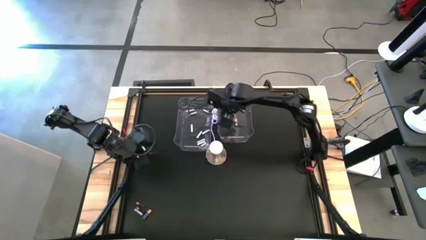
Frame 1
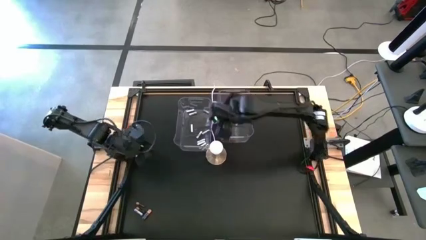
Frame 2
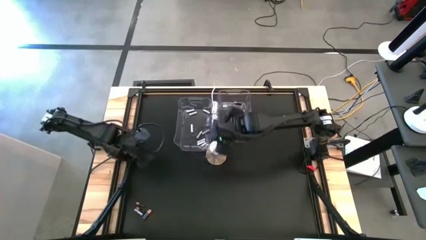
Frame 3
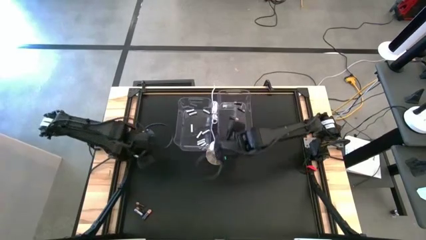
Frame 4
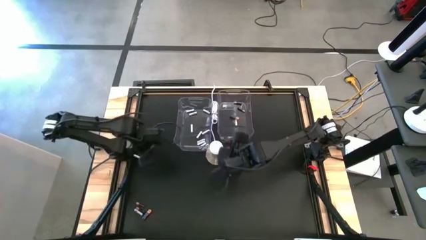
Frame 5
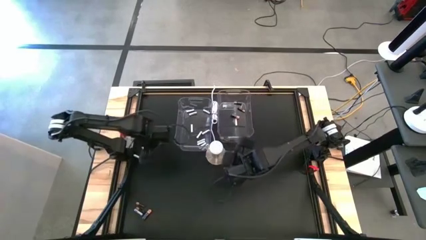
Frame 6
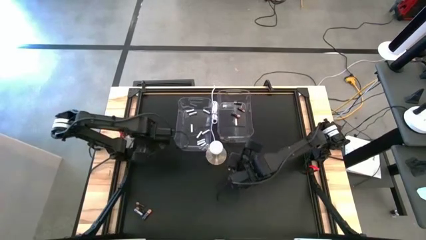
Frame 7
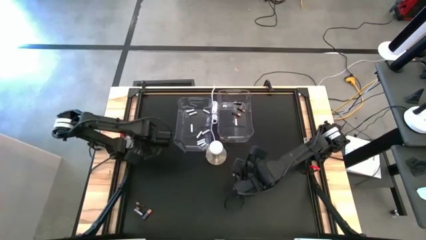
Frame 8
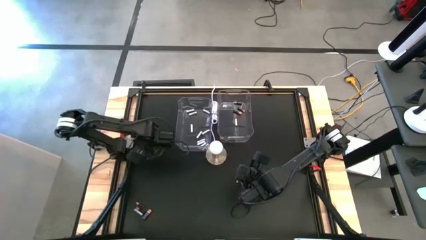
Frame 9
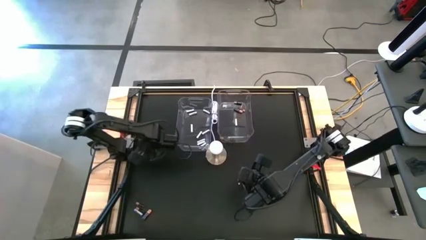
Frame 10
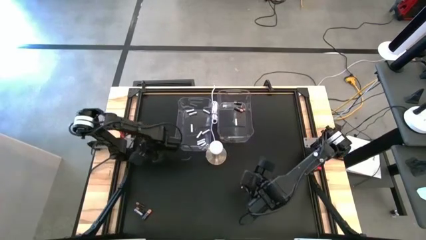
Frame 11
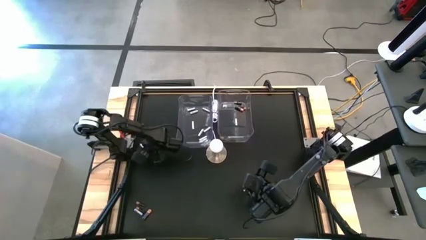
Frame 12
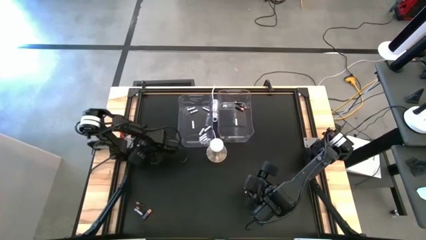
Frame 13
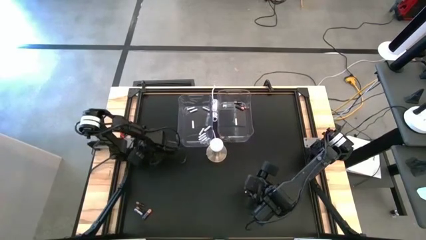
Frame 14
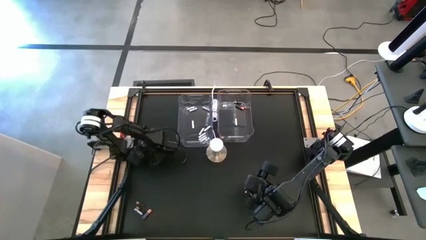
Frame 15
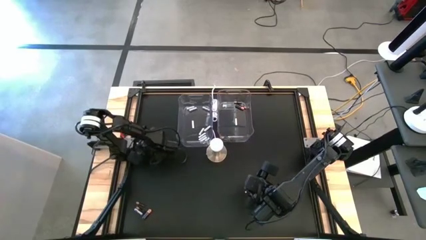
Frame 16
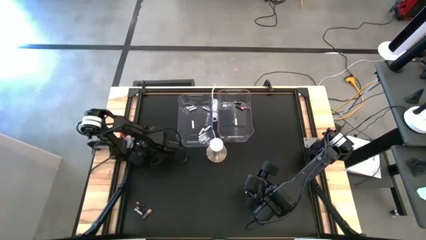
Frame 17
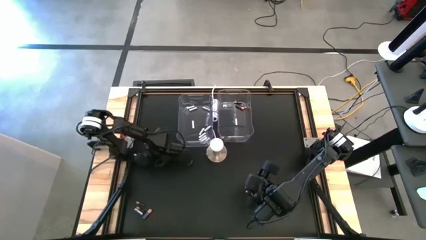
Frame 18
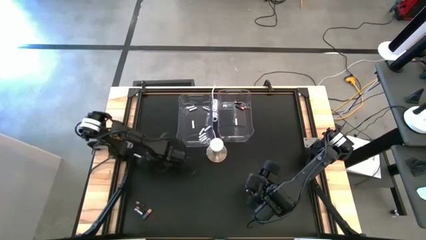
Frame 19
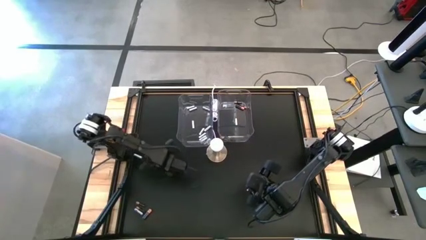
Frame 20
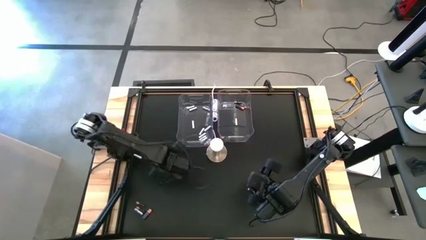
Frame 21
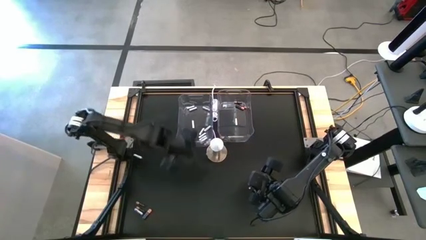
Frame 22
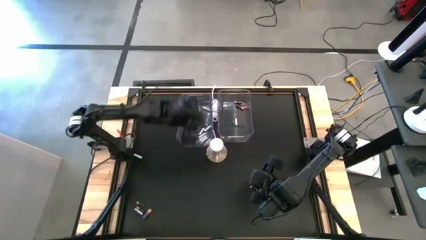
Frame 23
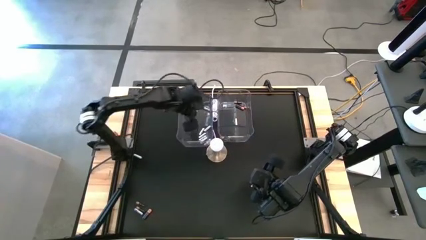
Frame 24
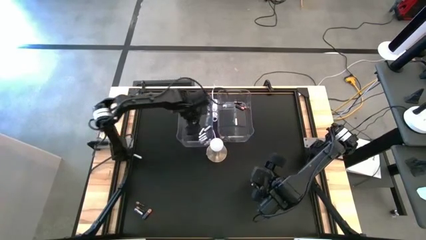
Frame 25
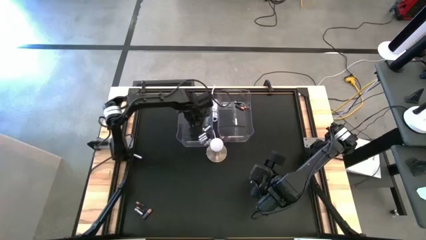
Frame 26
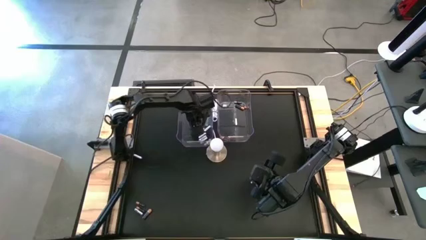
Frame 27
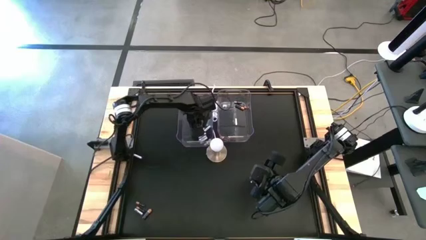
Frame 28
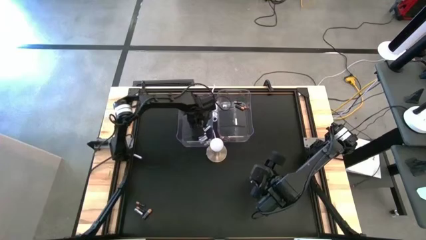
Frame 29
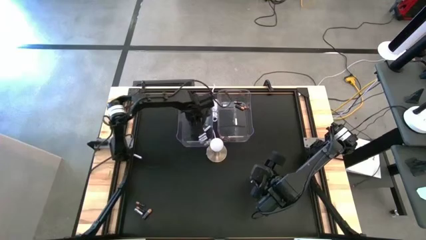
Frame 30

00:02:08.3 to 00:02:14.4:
Task: Sort batteries
Put the white battery into the left transparent bin

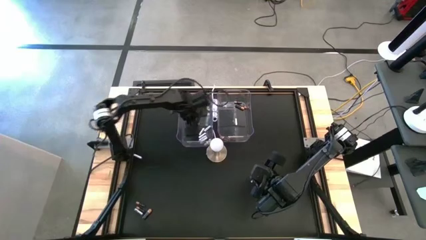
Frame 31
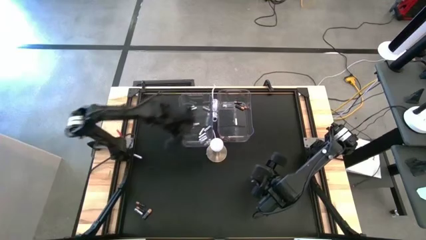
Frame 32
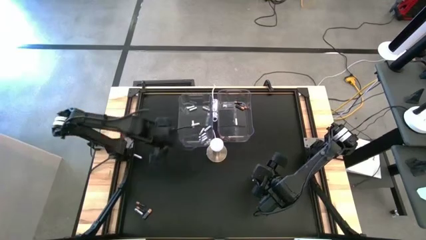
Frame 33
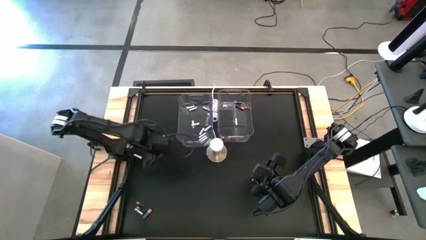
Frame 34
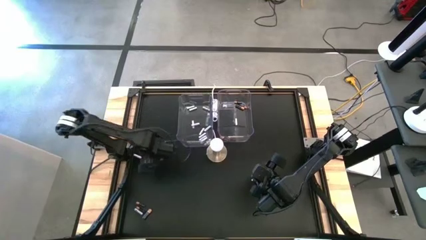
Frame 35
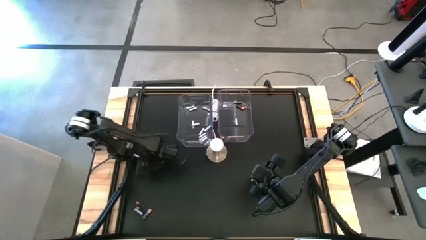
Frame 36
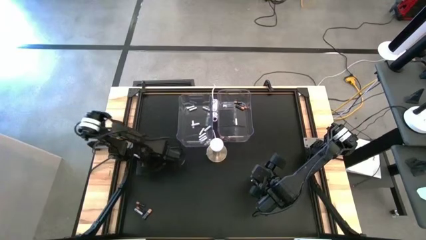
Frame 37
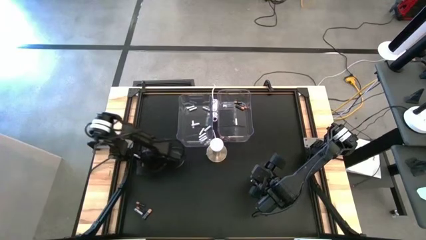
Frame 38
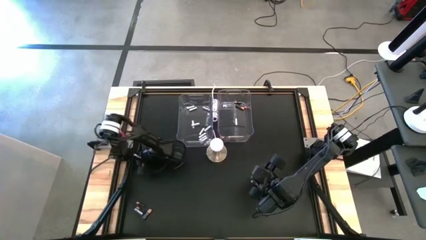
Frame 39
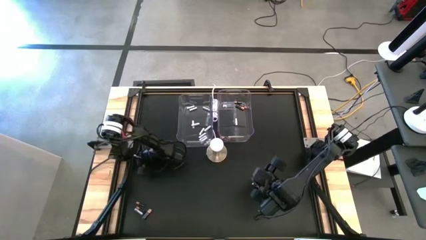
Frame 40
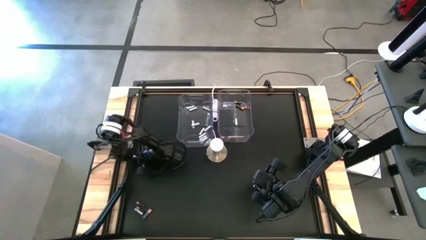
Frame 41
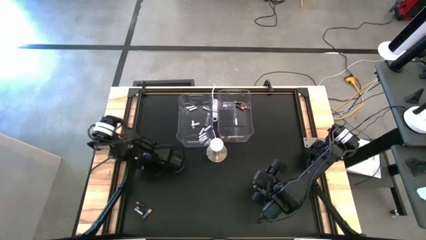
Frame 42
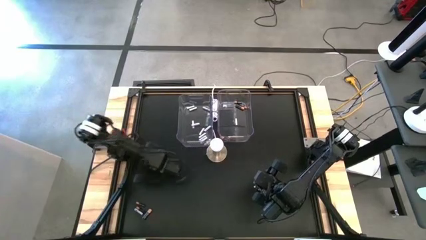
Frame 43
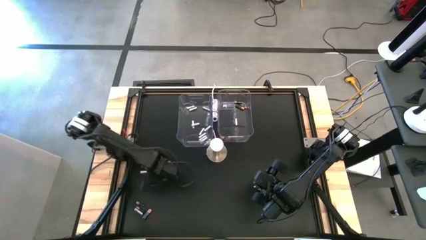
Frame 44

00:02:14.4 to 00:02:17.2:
Put the white battery into the left transparent bin

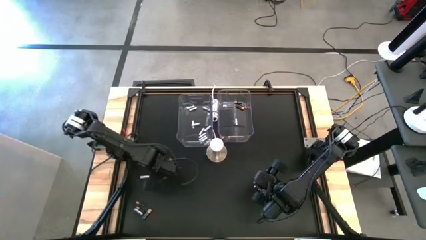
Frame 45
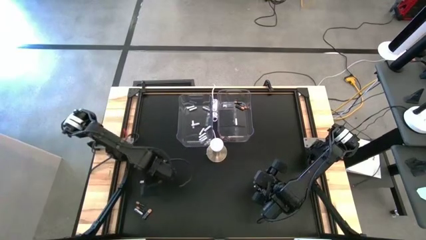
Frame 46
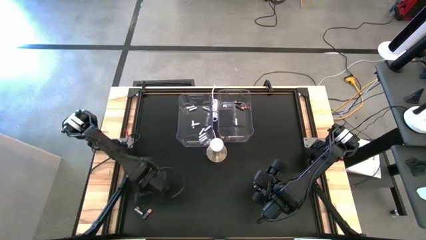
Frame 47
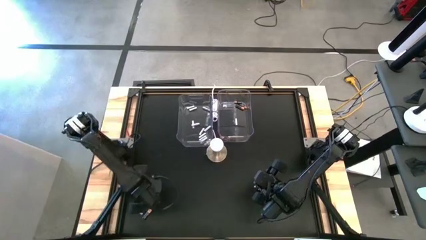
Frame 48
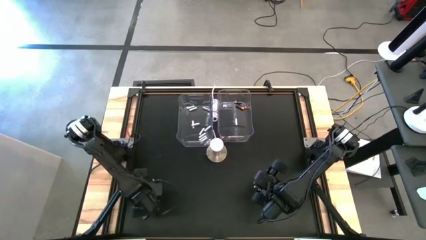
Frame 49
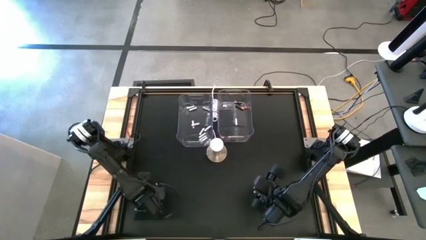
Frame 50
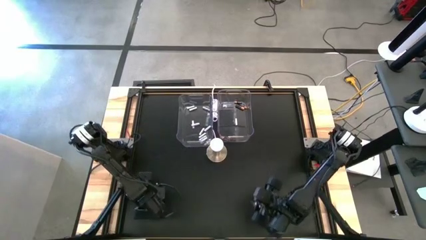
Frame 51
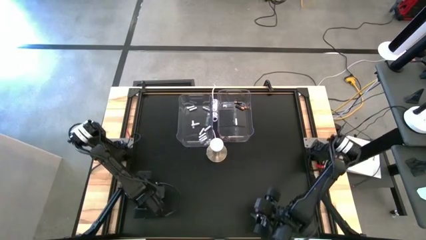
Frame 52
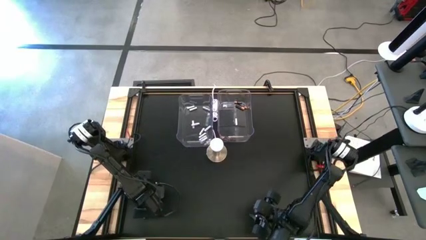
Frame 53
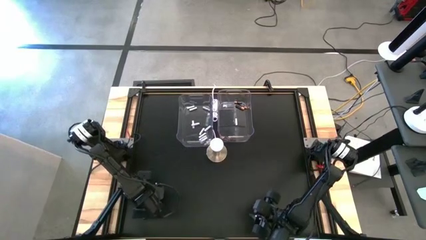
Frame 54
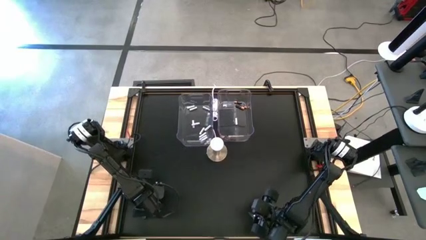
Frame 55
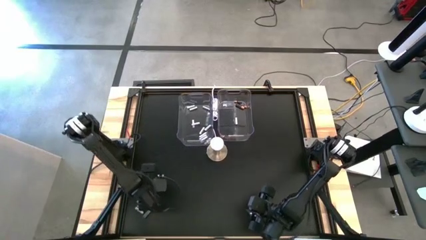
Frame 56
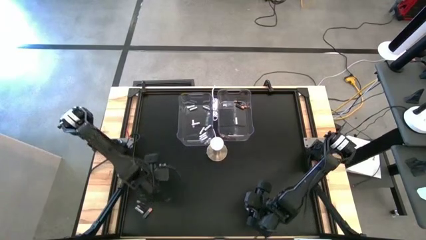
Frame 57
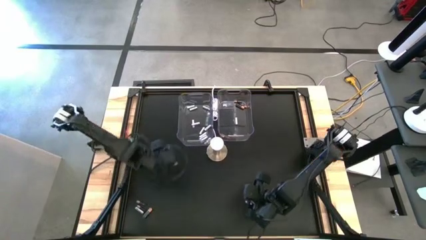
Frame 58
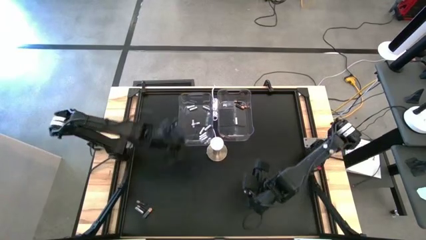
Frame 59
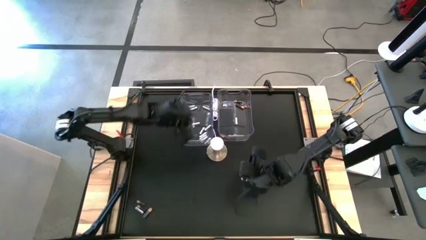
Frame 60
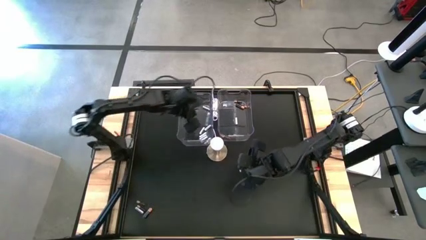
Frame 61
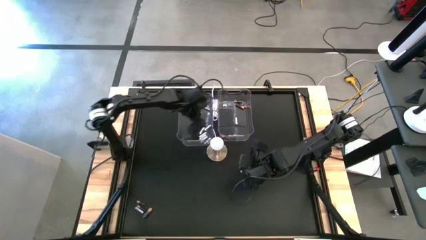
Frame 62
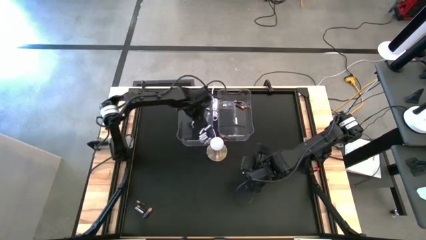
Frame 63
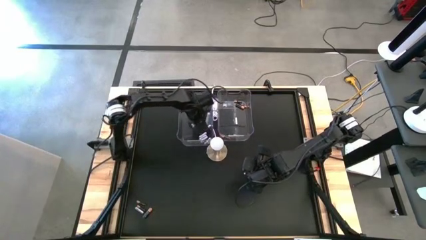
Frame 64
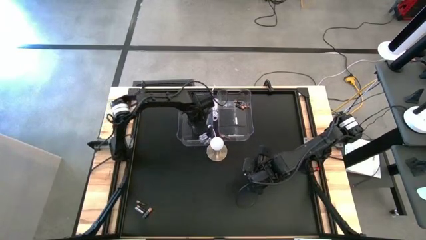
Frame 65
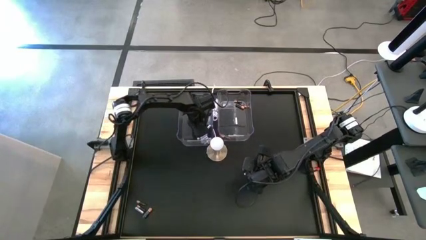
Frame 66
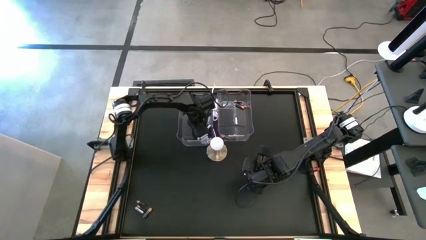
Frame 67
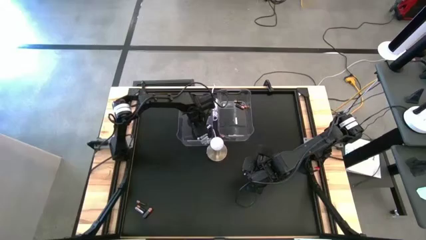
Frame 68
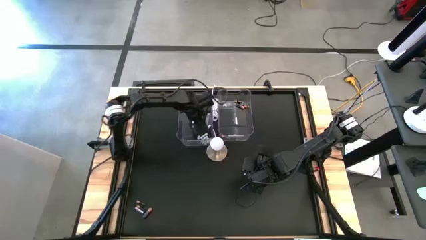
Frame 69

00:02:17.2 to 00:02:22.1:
Put the white battery into the left transparent bin
